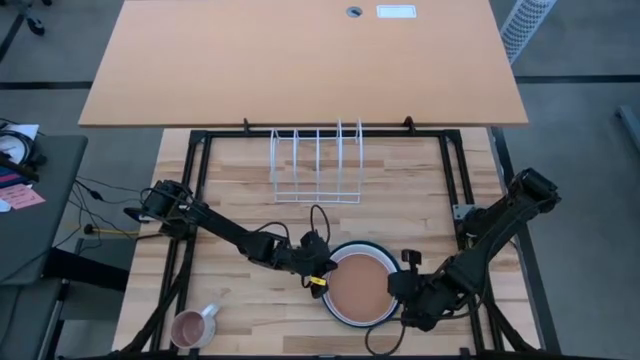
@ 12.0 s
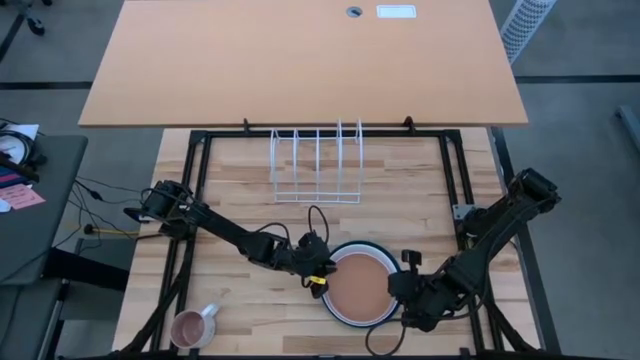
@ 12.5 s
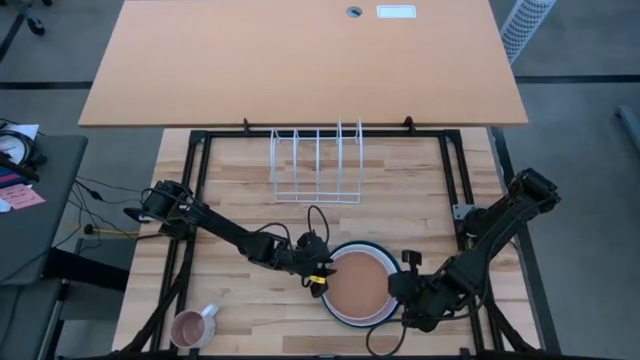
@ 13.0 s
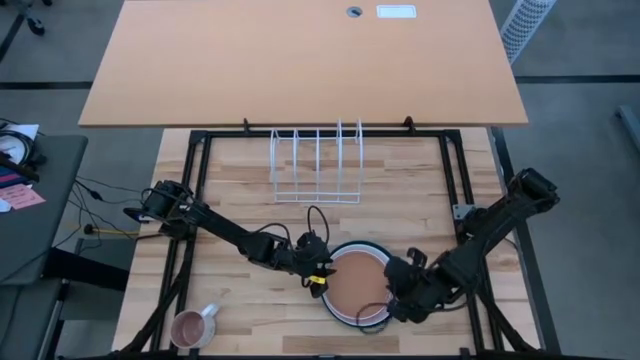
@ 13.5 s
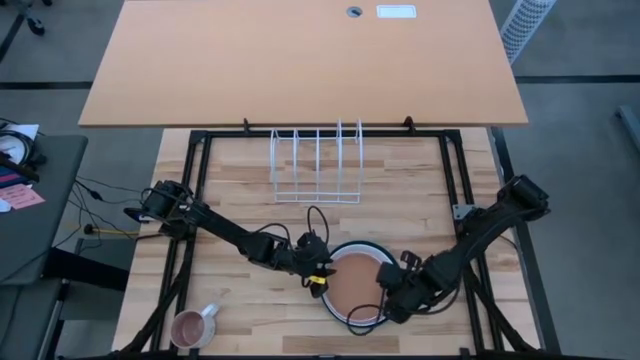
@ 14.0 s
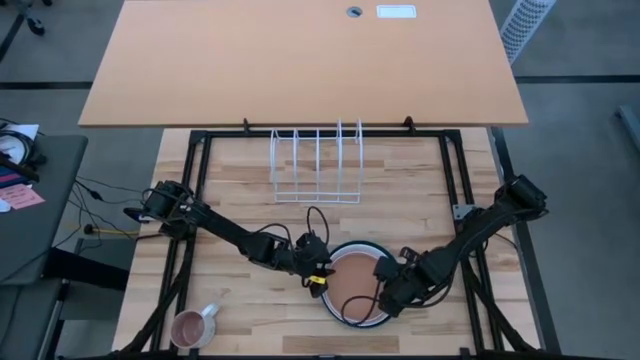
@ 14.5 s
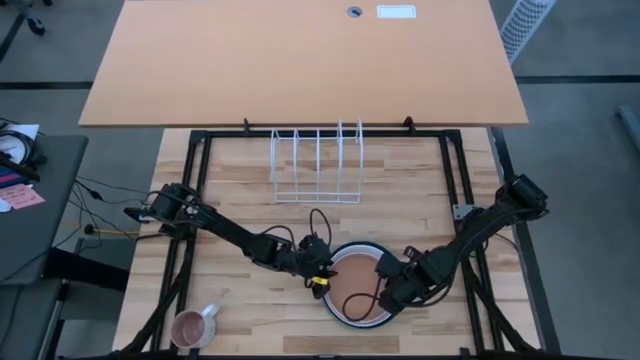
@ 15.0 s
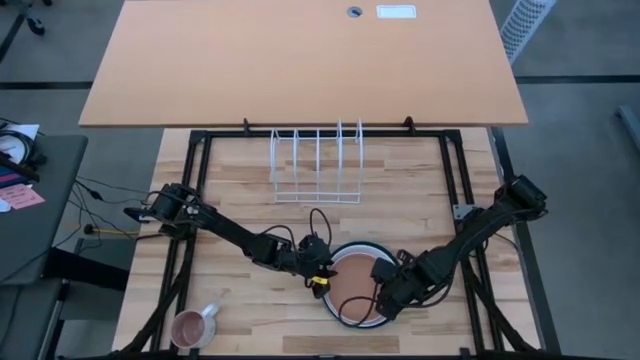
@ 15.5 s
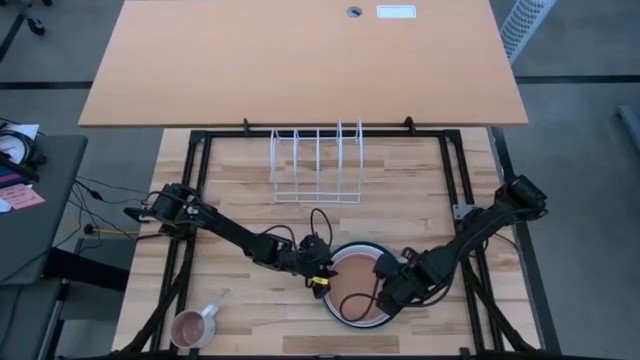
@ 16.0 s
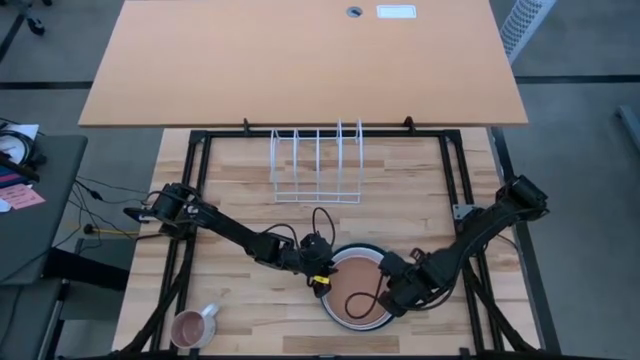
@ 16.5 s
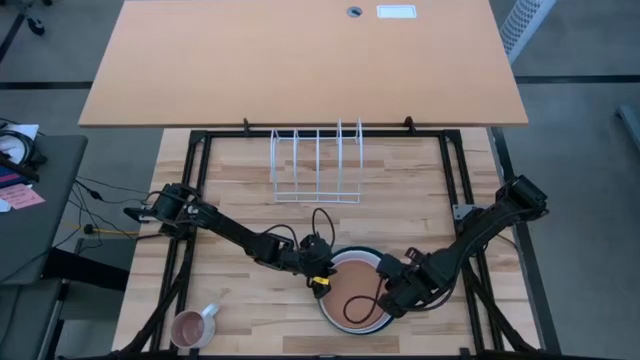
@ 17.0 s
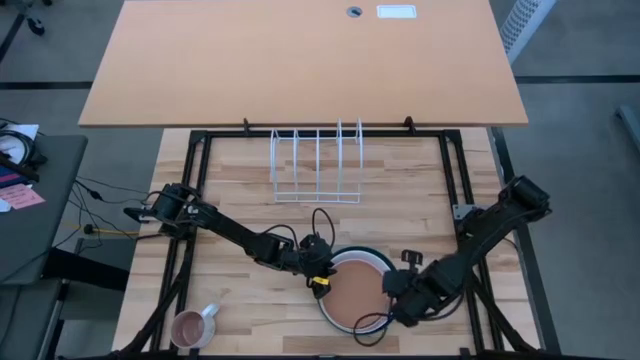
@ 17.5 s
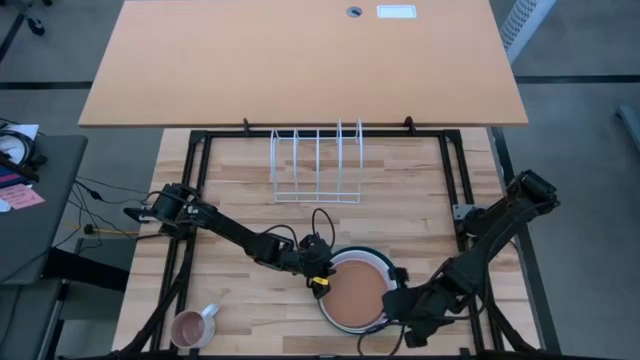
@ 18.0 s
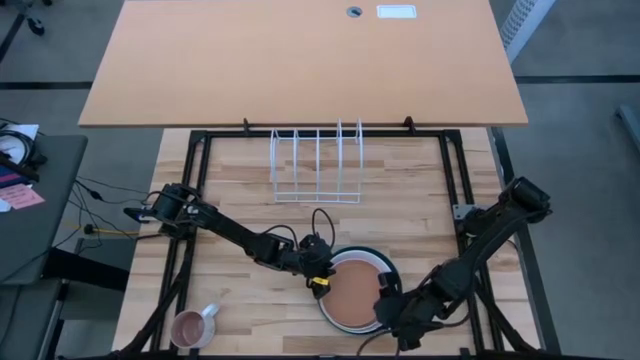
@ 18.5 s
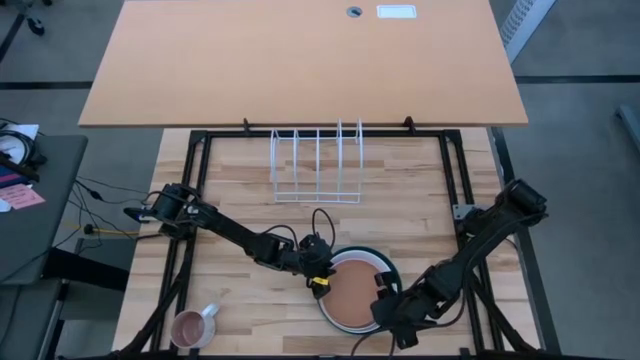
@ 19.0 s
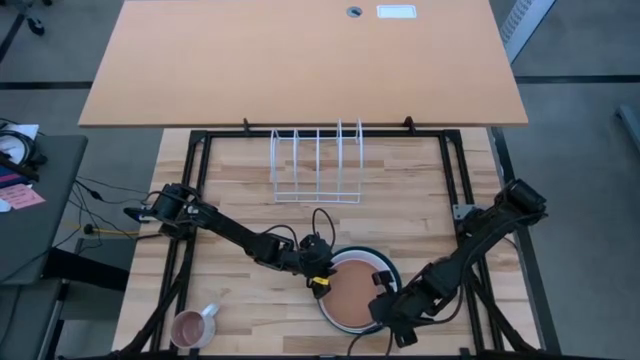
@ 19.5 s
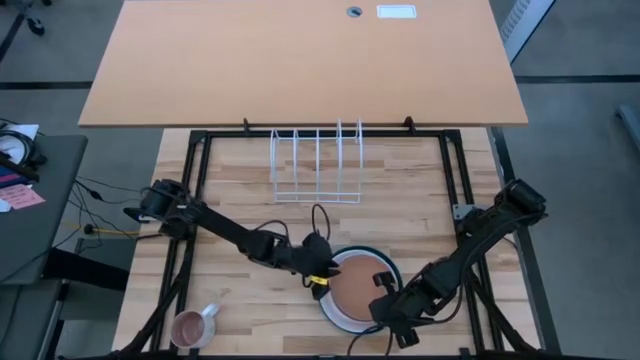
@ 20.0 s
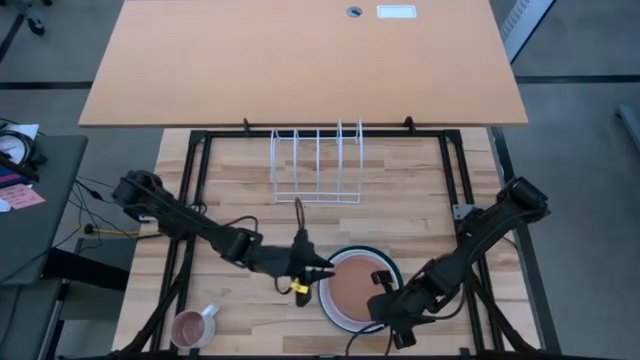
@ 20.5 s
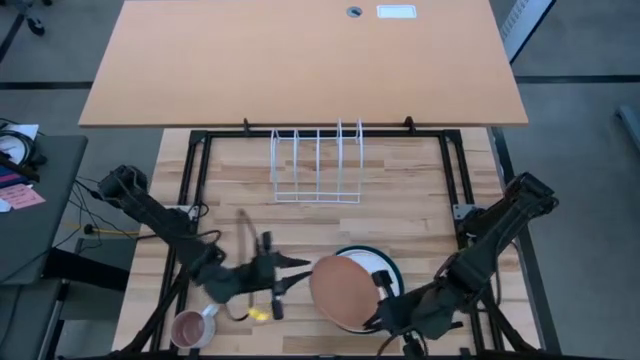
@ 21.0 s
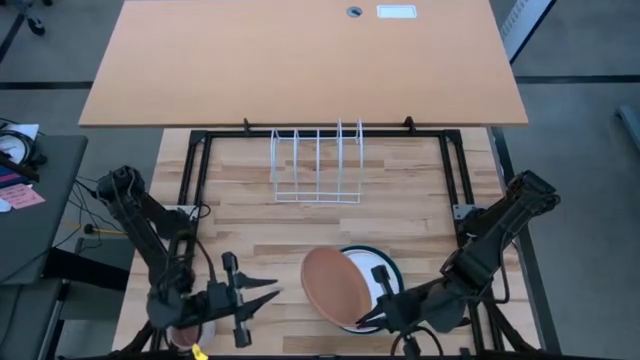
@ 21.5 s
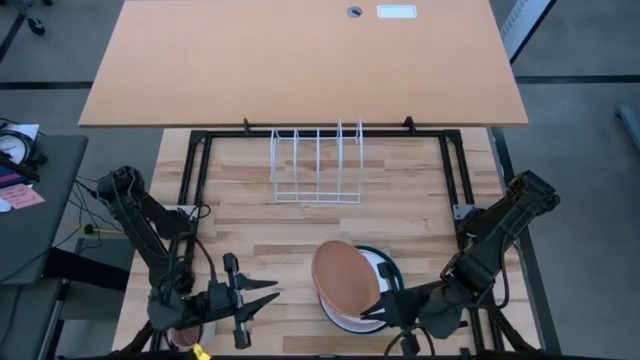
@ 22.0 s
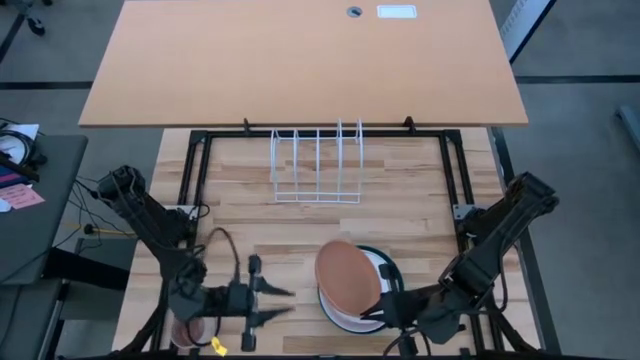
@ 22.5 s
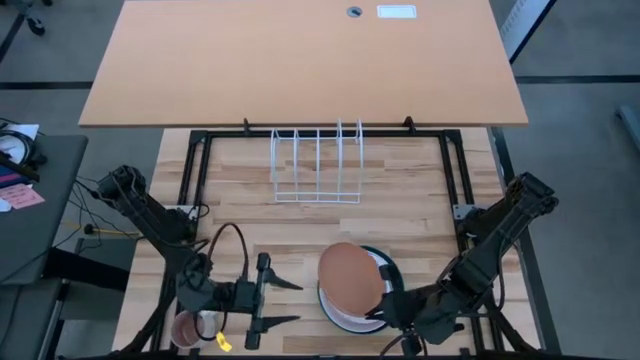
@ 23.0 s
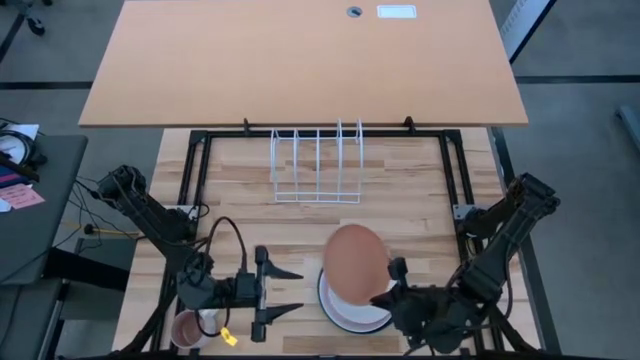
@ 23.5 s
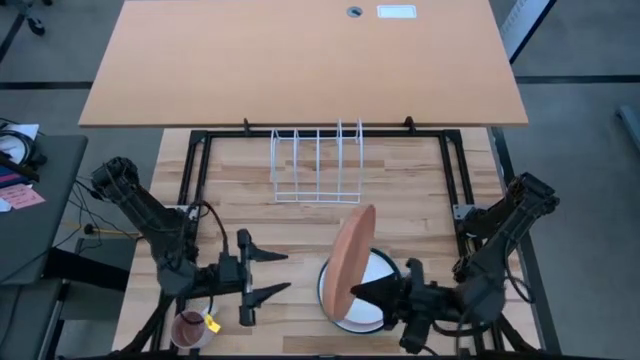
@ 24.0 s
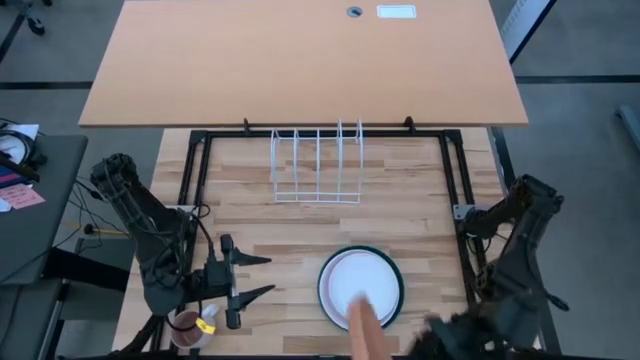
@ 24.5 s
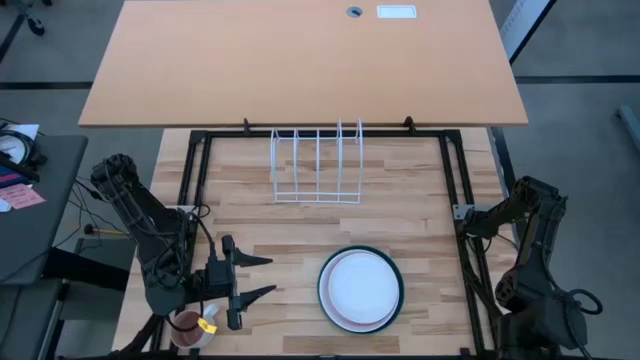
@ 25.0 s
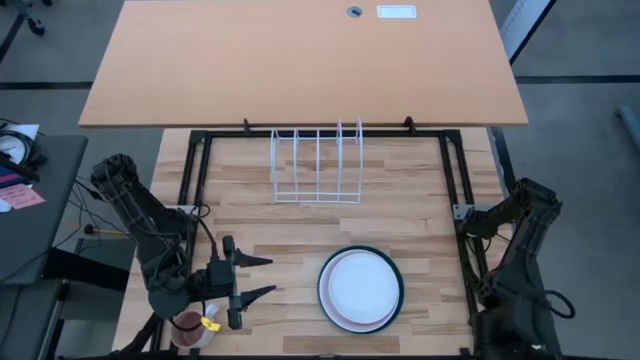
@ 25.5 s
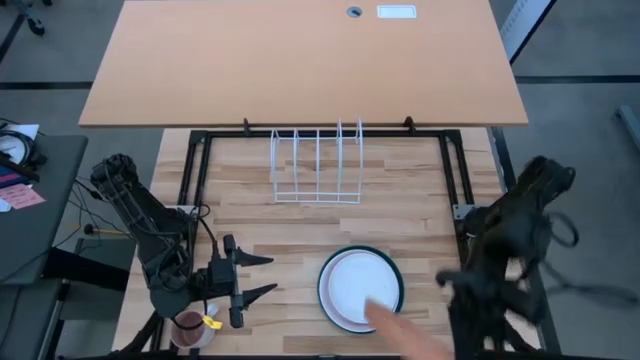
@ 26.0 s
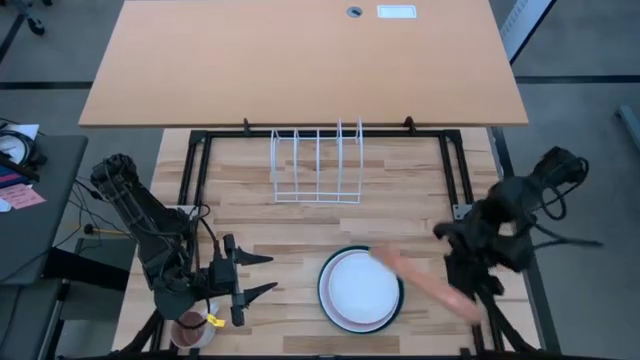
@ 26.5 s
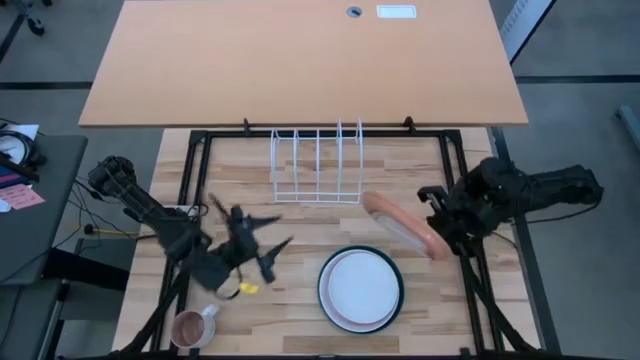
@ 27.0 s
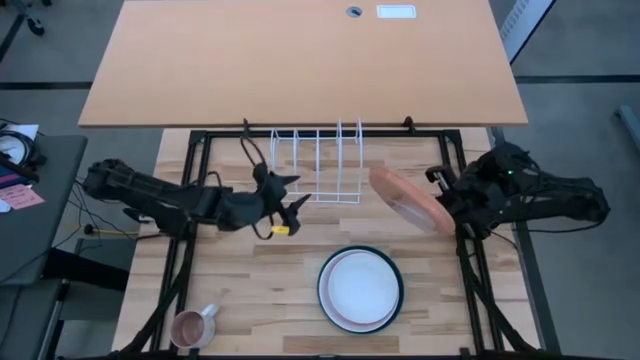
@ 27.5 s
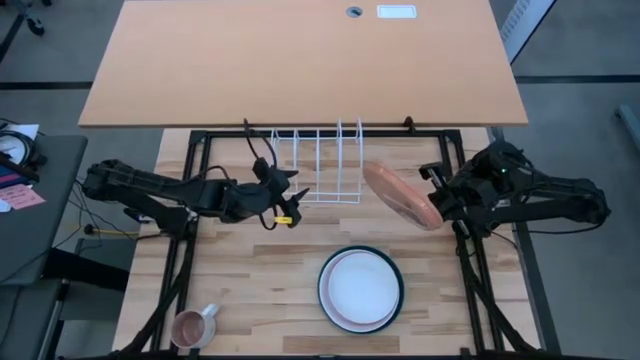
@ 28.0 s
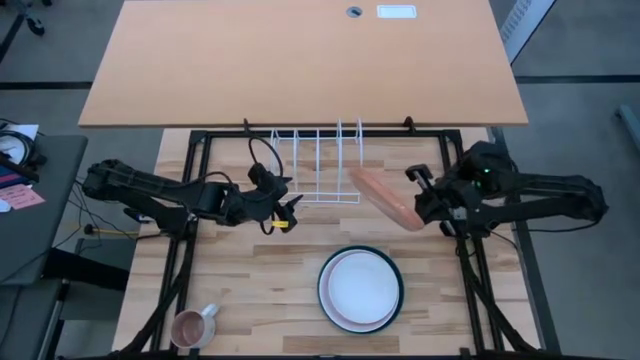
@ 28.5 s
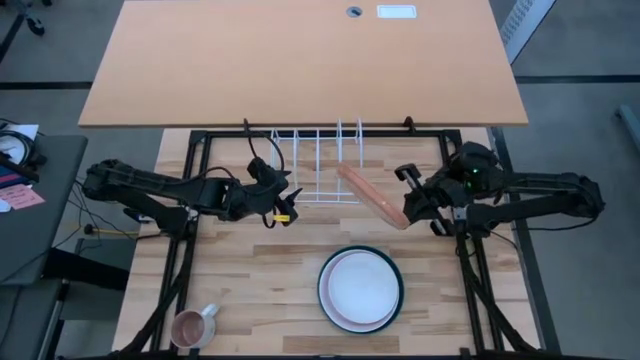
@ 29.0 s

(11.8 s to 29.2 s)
Task: Sort dishes
Put the light orange plate in the dish rack

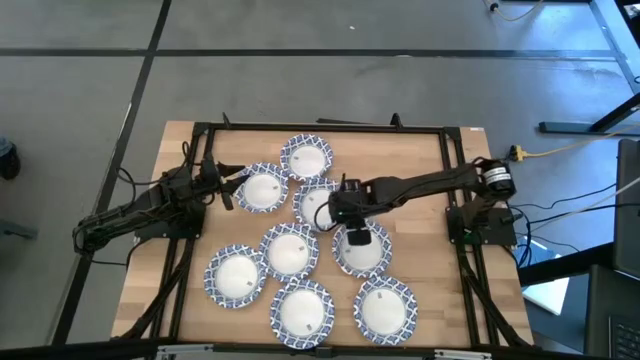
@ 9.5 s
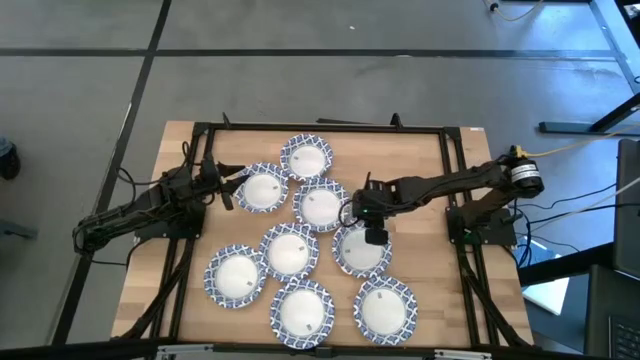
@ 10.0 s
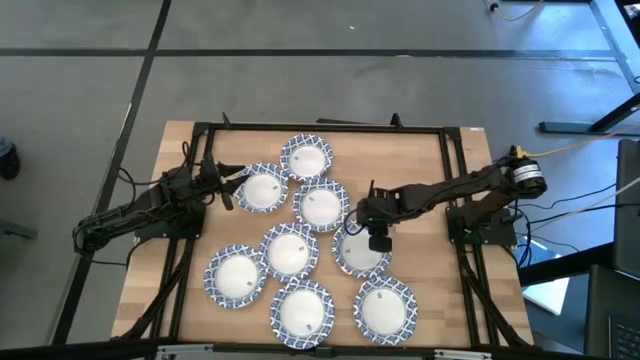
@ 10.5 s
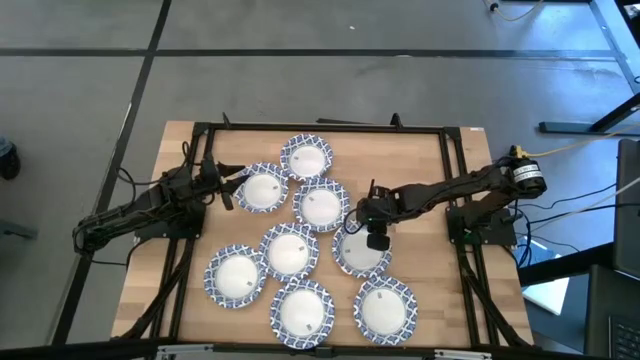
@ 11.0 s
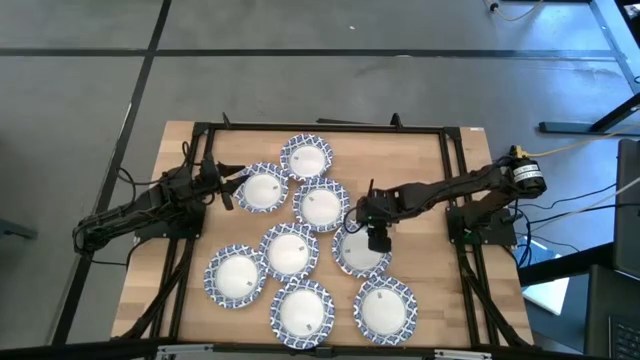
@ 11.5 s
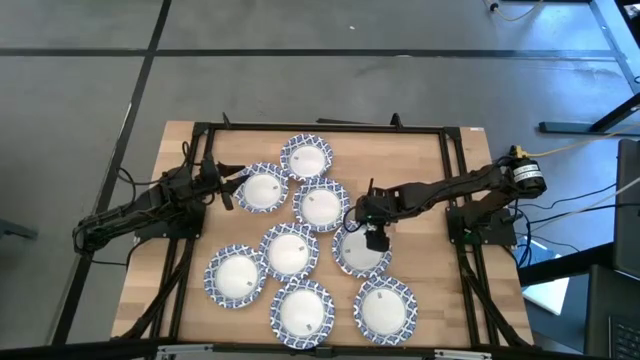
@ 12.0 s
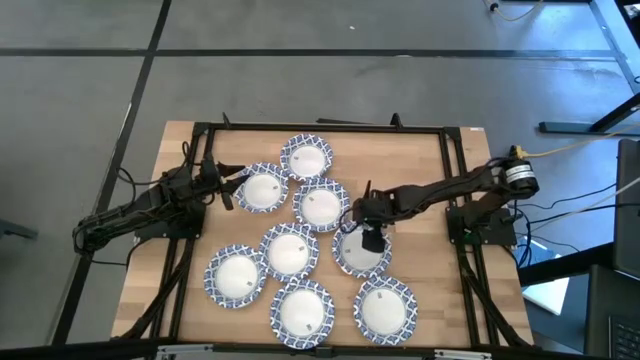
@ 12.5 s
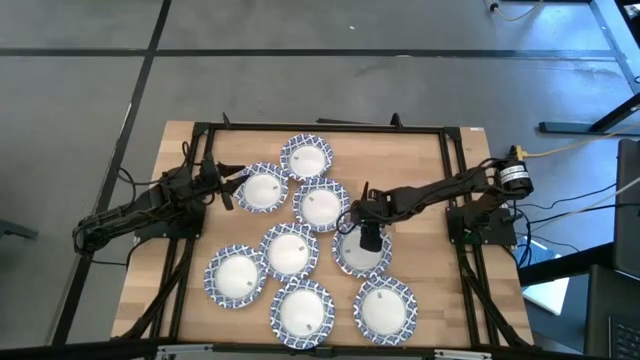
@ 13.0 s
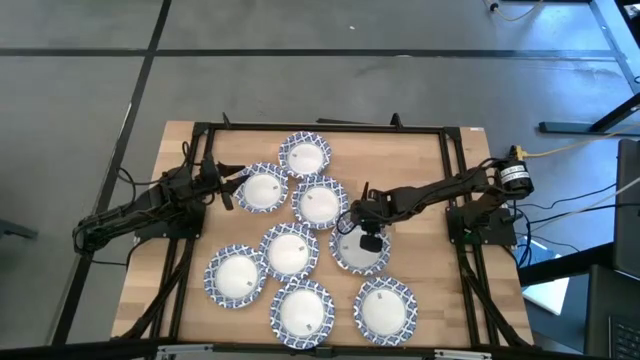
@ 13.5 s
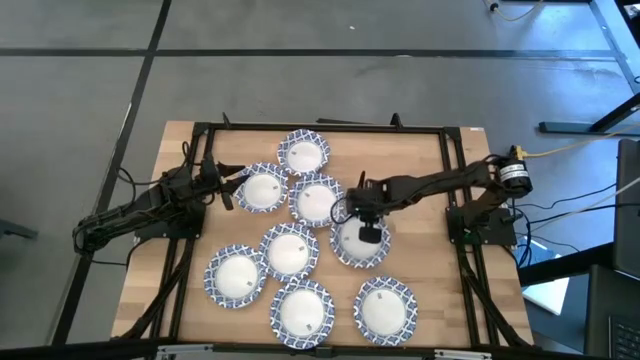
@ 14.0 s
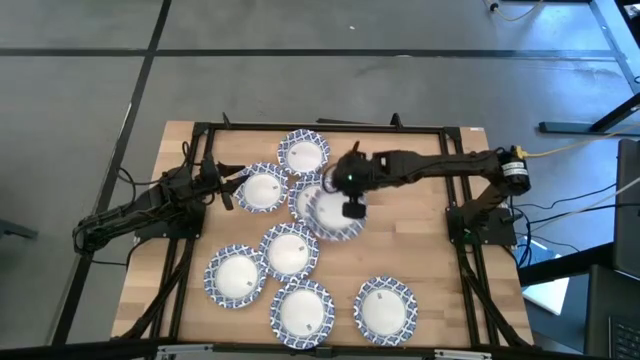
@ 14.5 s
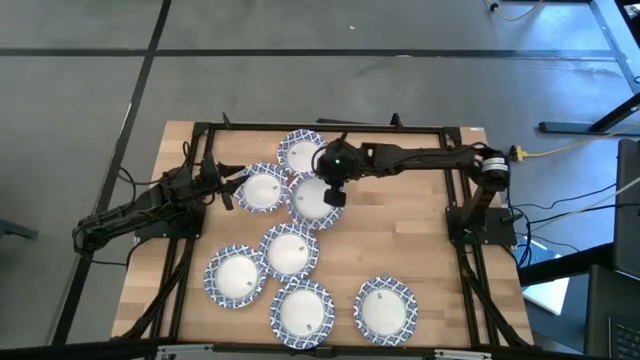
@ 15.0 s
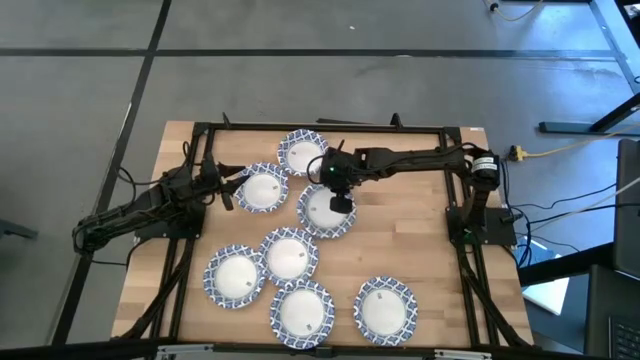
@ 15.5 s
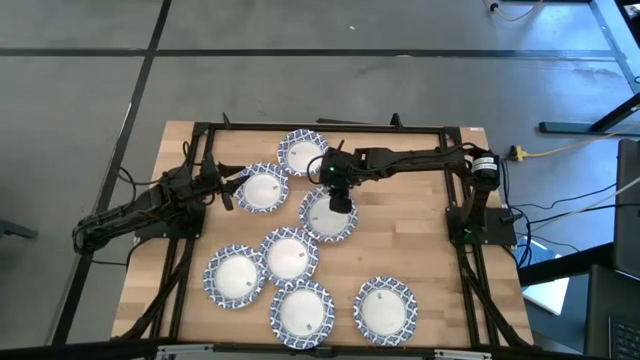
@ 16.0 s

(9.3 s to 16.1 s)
Task: Nest bowls inside each other
Stack the blue patterned bowl on the stacked blue patterned bowls
